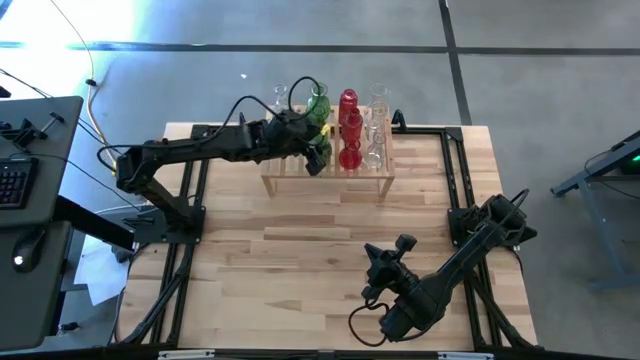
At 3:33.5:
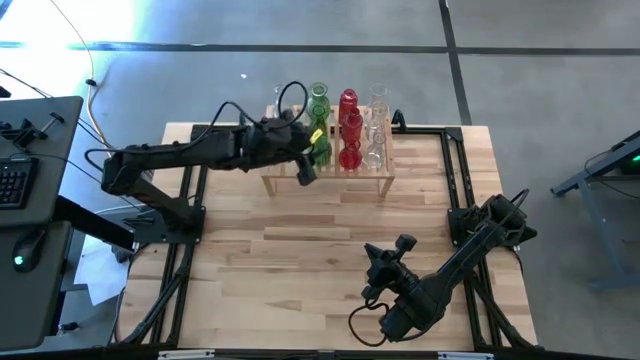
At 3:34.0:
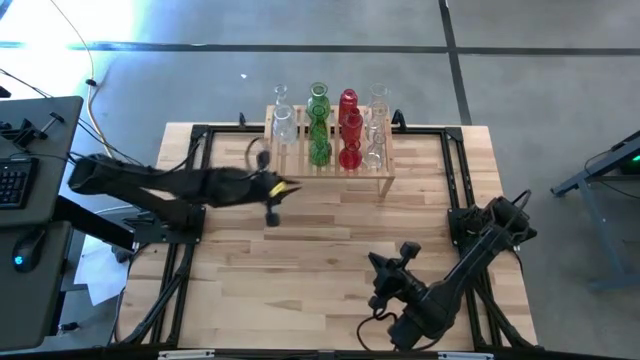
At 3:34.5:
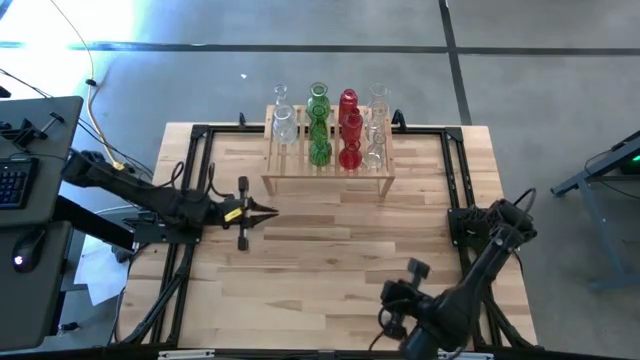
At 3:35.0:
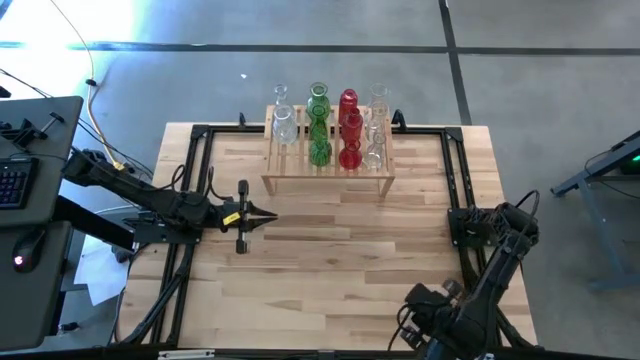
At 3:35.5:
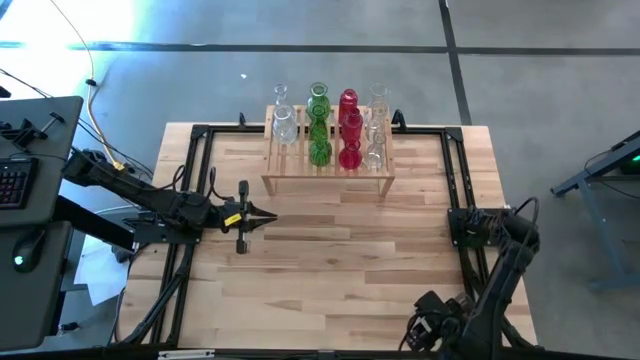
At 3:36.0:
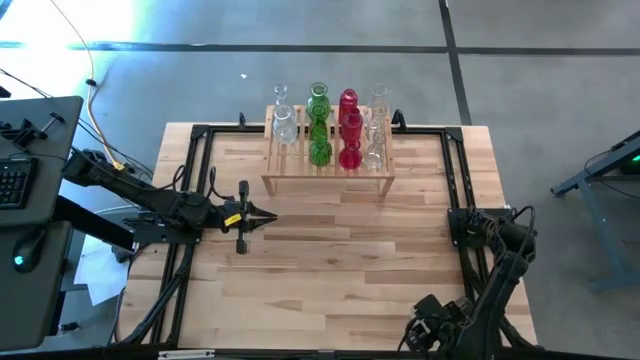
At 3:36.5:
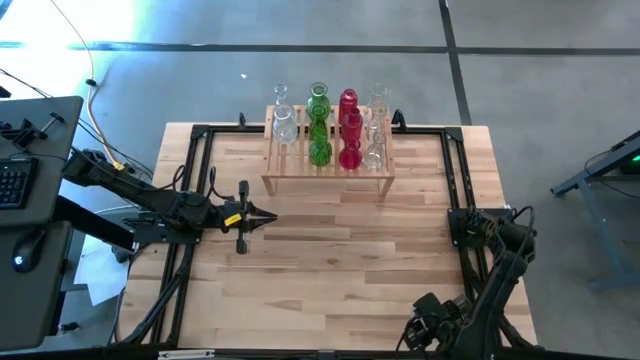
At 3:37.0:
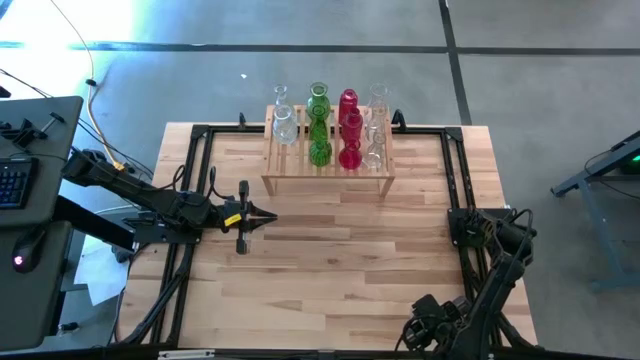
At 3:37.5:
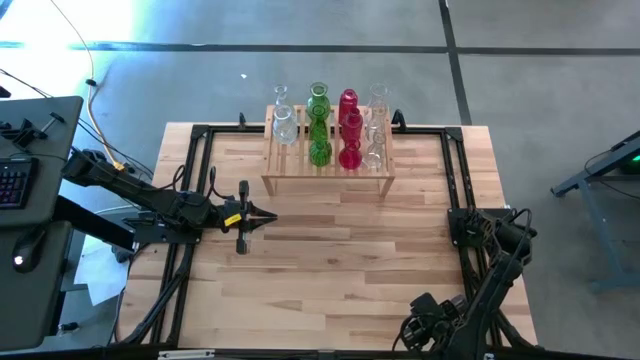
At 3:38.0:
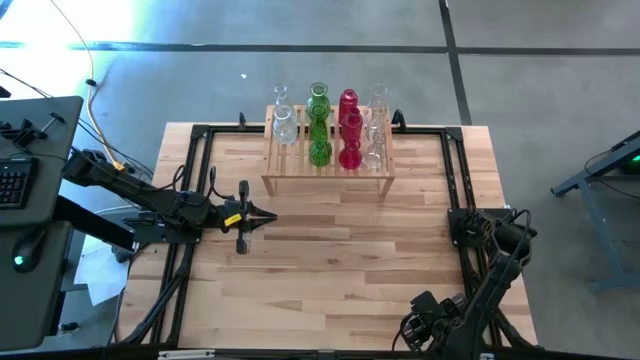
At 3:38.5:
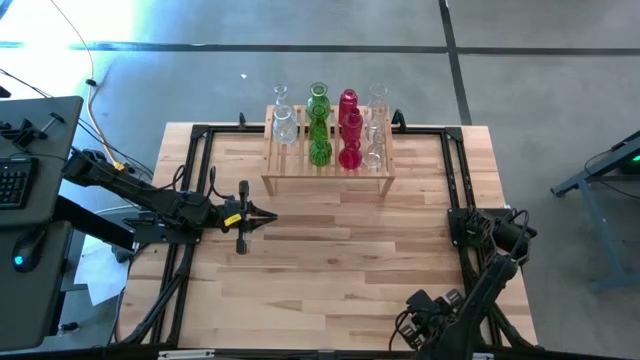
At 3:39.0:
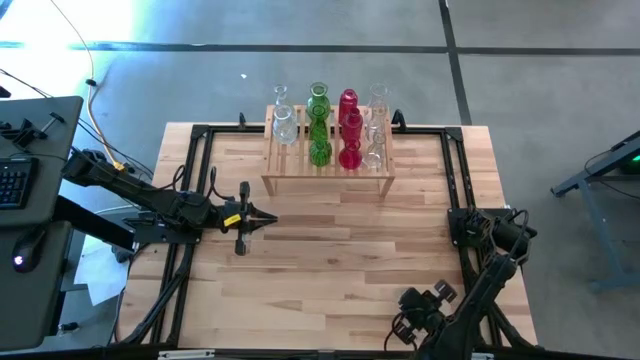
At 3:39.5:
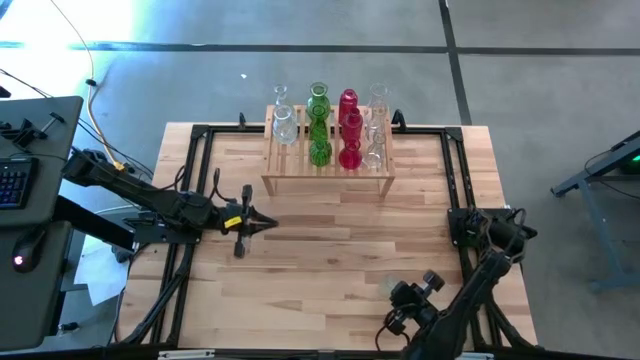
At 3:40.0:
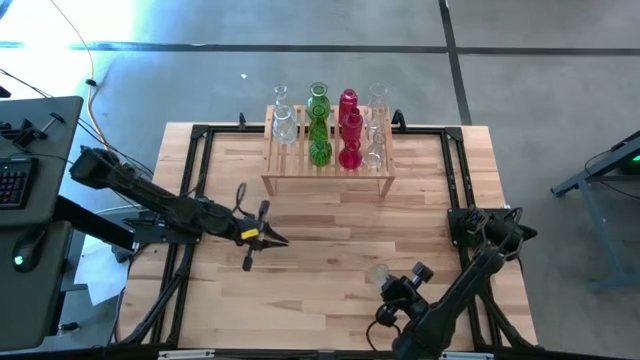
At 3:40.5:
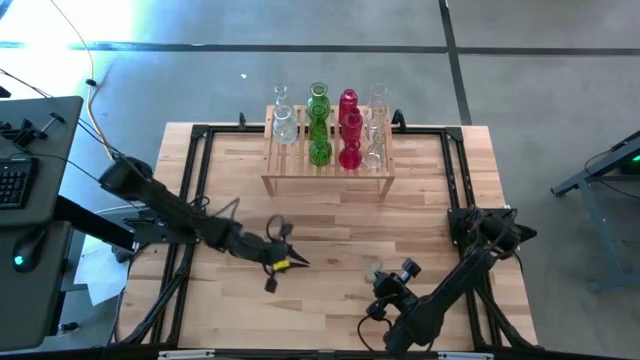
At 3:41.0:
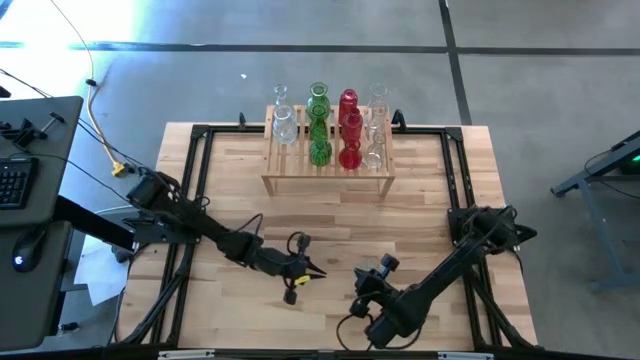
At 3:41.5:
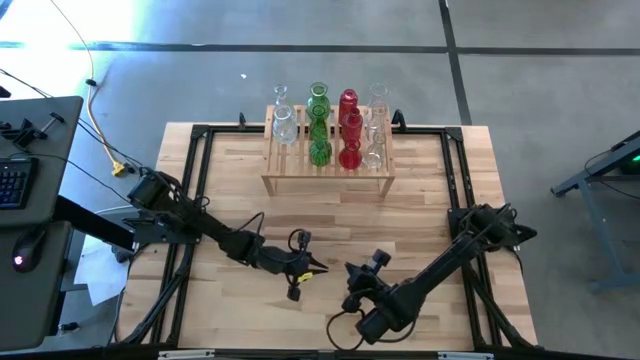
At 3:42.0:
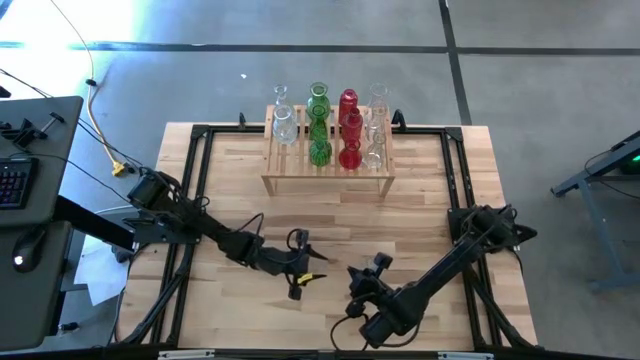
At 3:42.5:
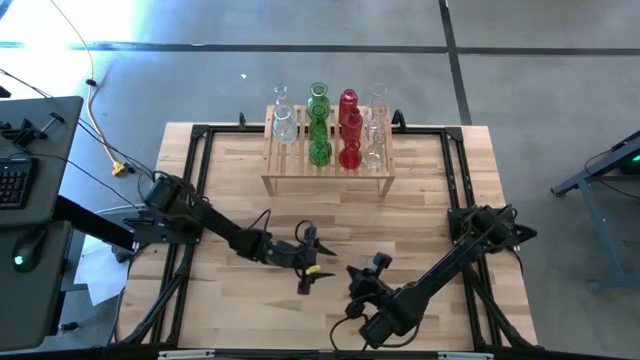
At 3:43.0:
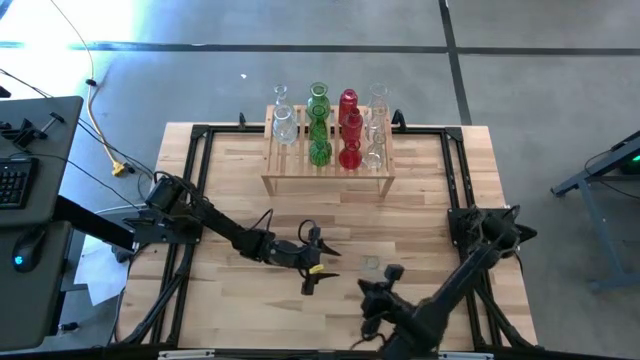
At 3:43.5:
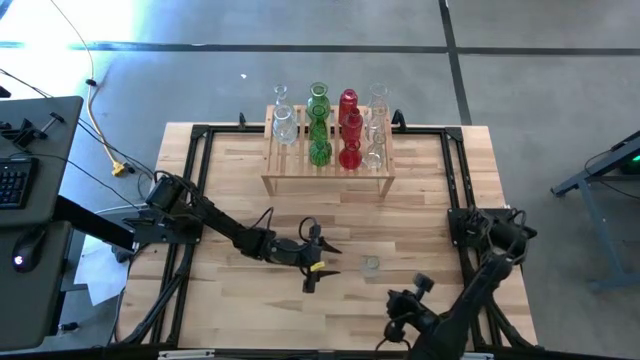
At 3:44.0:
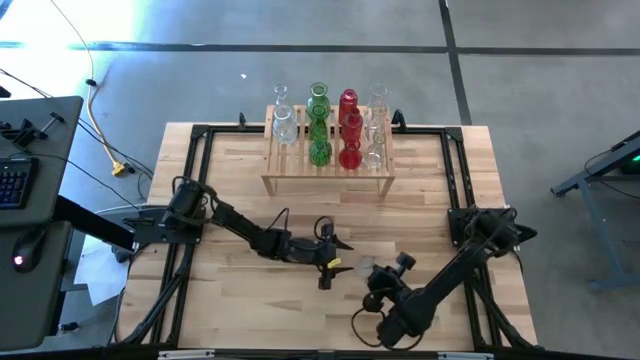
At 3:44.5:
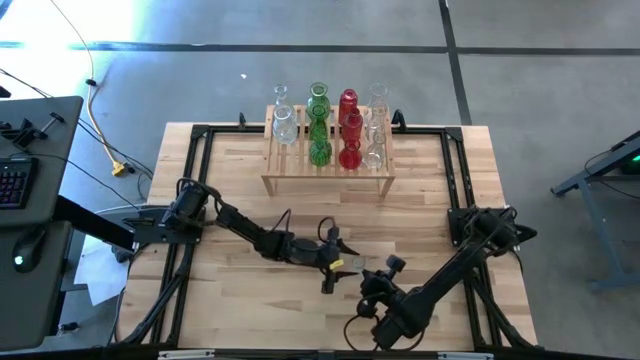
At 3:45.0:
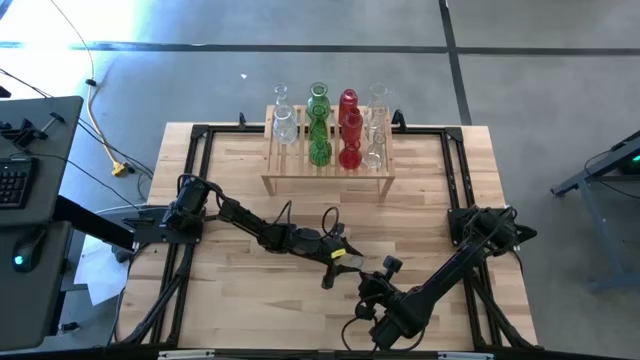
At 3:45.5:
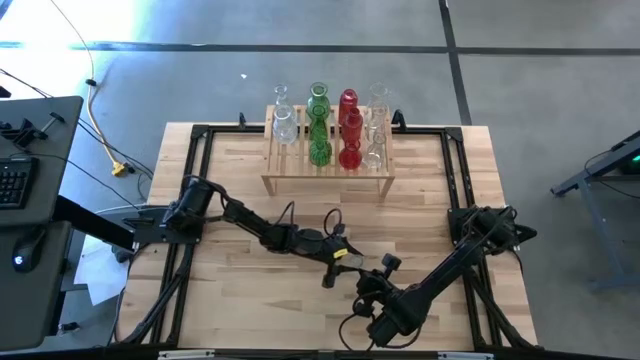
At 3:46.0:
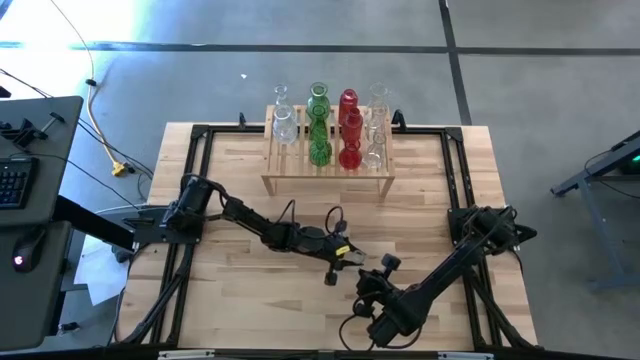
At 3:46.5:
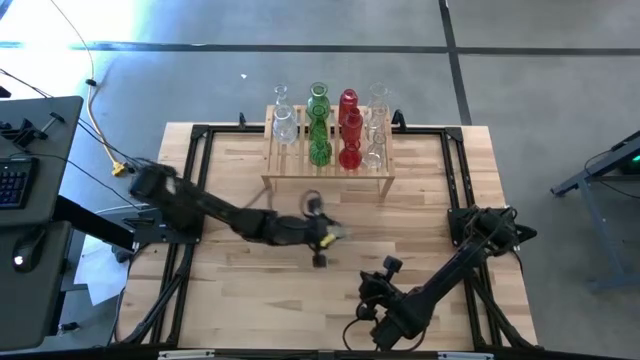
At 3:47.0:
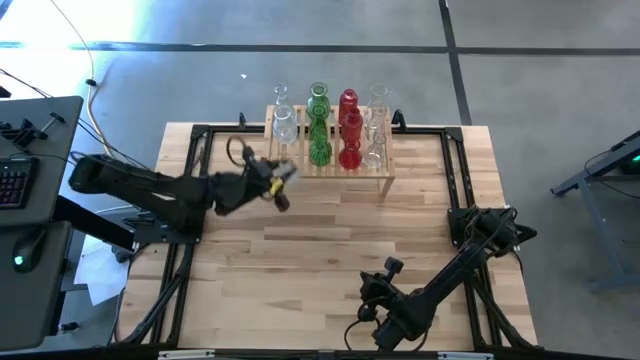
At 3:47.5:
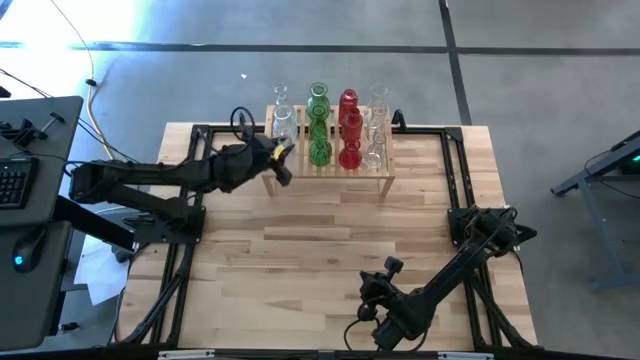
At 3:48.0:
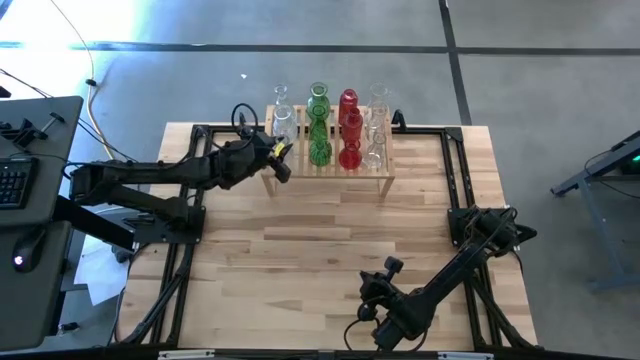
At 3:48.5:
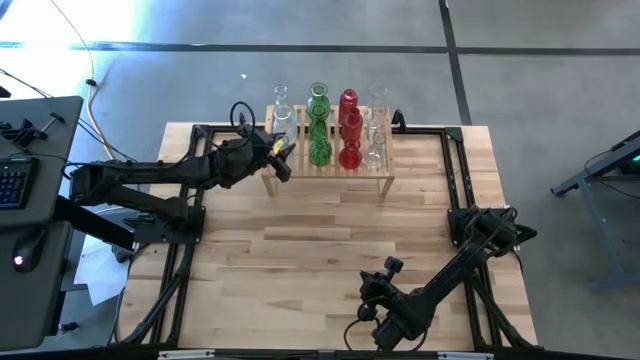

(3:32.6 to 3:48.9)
Task: sort vases onto shelf
Put the transparent vase on the shelf aligned with the other transparent vases

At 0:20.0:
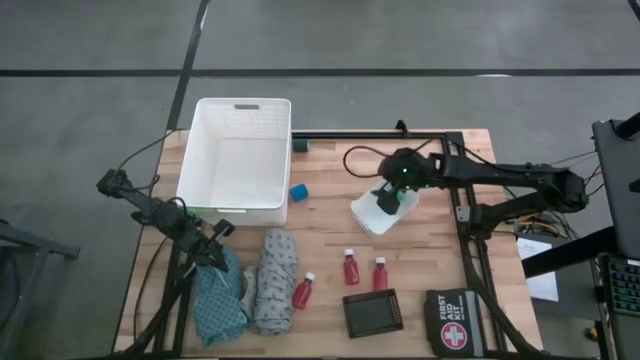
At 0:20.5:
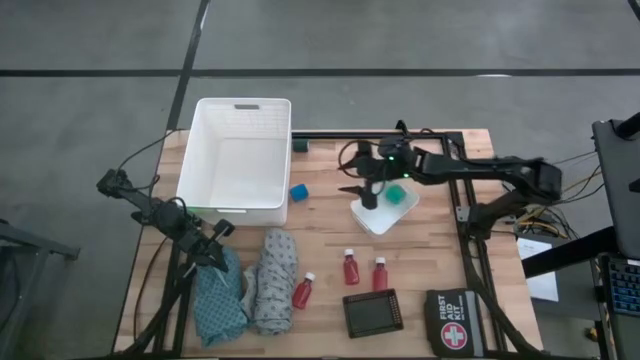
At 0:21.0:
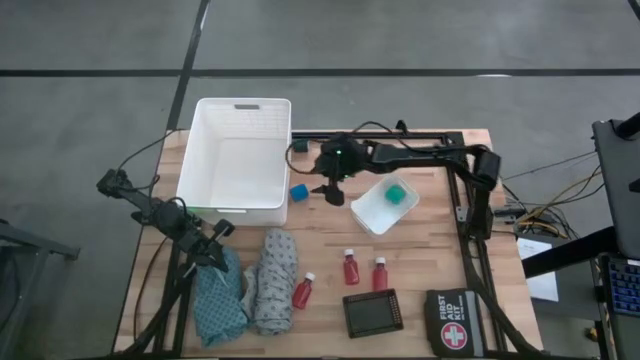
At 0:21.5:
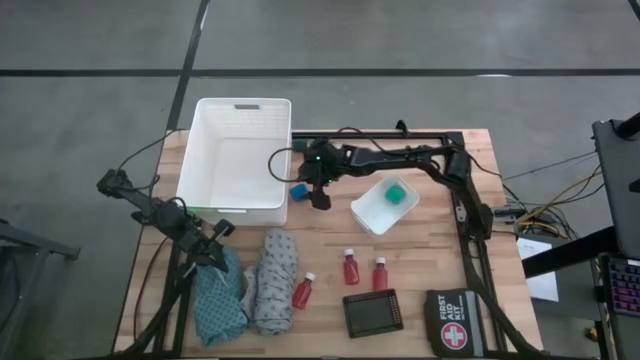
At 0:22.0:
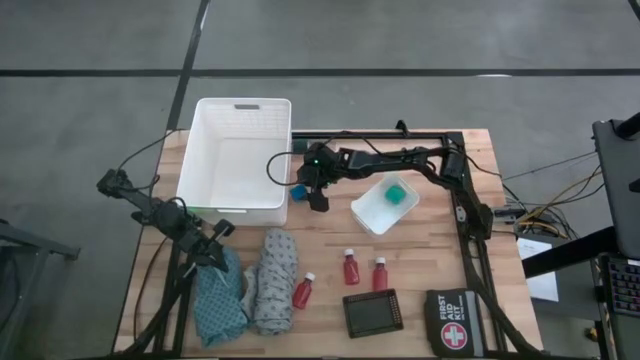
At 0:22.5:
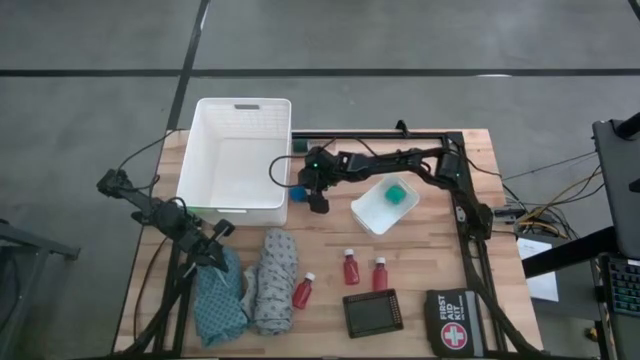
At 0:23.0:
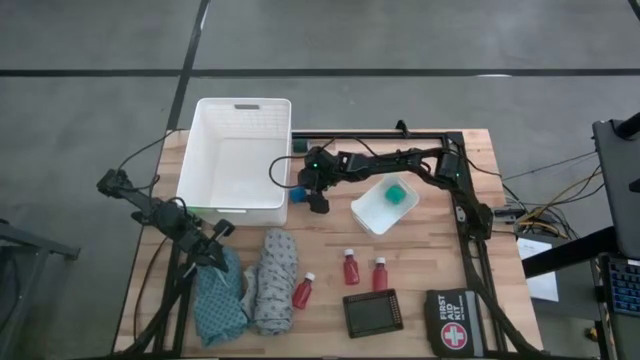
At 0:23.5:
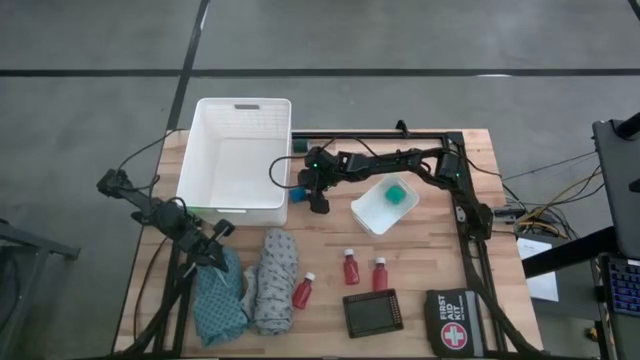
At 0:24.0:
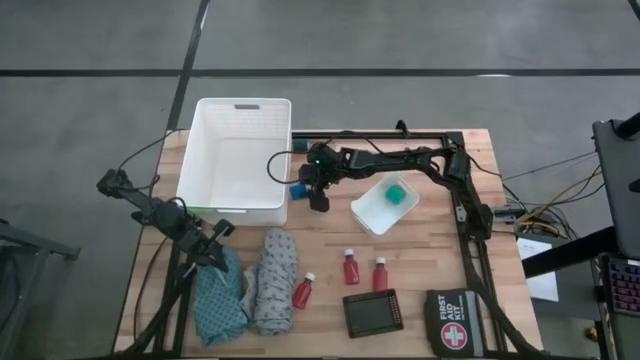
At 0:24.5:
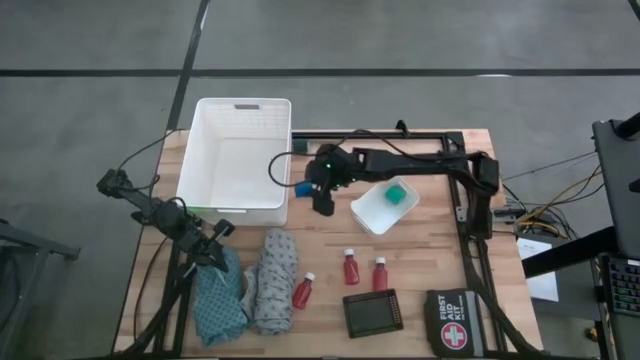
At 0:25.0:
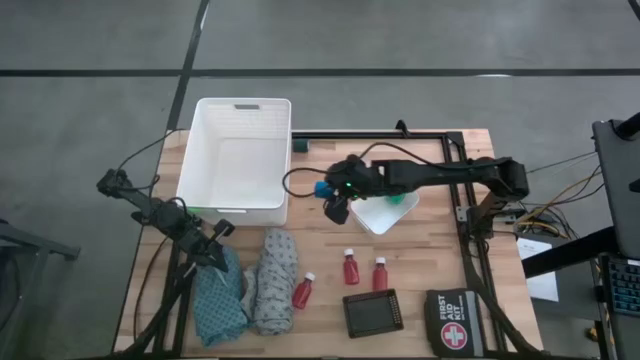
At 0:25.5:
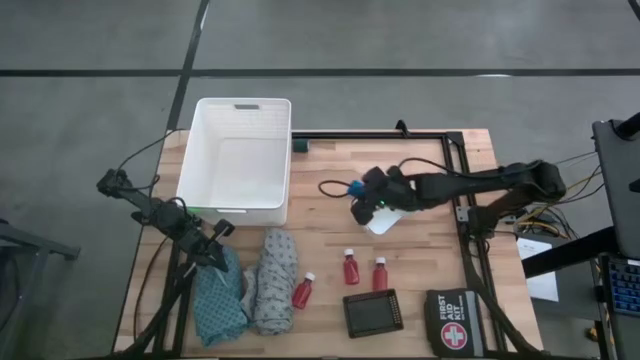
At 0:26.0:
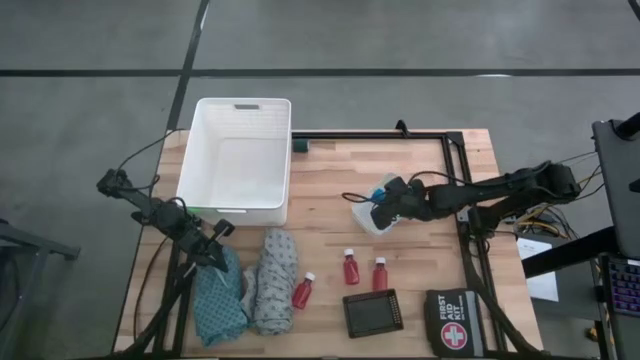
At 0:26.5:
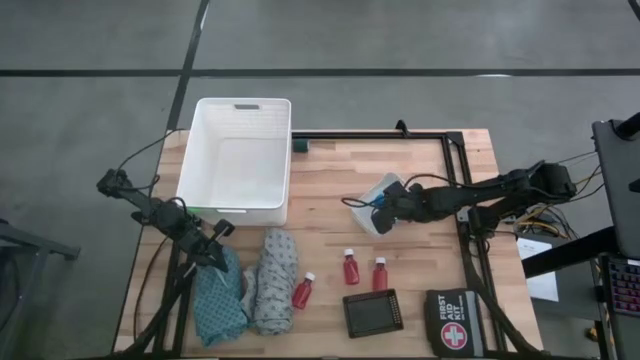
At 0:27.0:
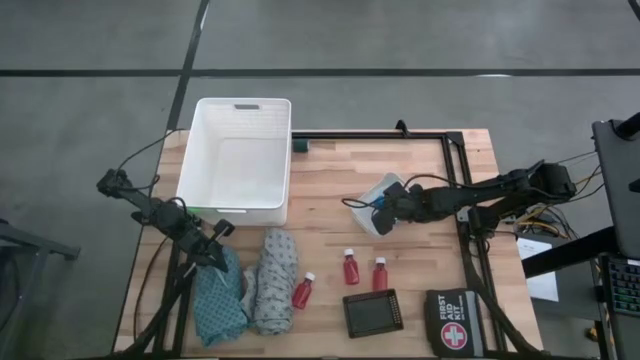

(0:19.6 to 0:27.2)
Task: Pick & place medical supplies in basket/bin
Put the blue bandage into the small white bin
